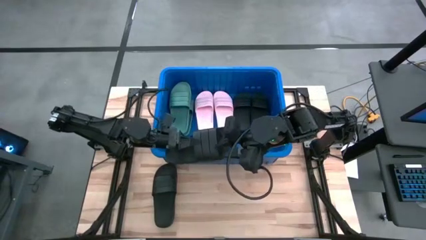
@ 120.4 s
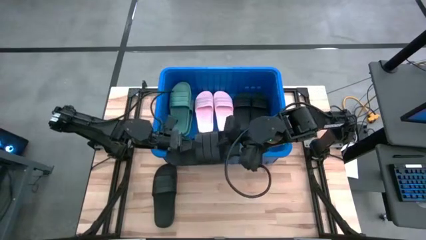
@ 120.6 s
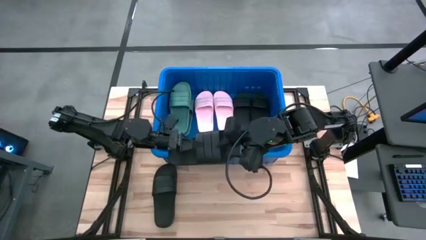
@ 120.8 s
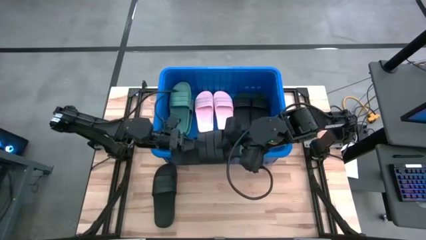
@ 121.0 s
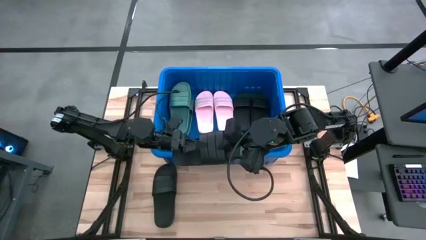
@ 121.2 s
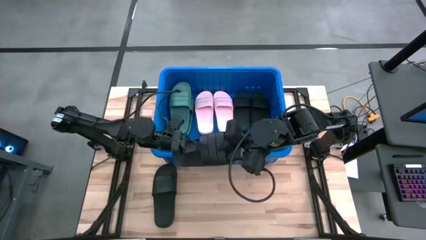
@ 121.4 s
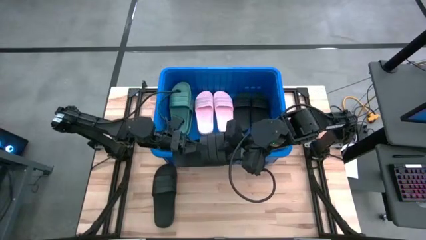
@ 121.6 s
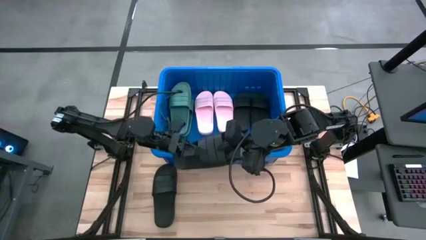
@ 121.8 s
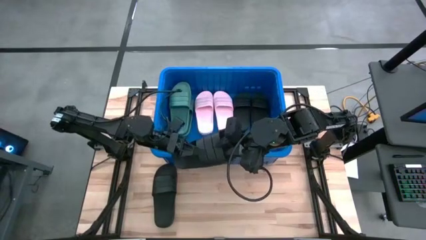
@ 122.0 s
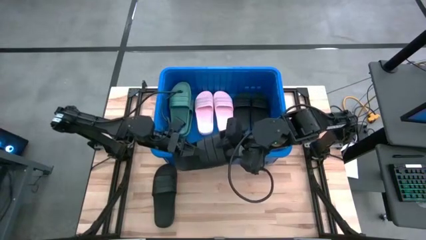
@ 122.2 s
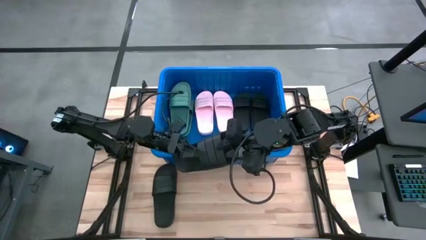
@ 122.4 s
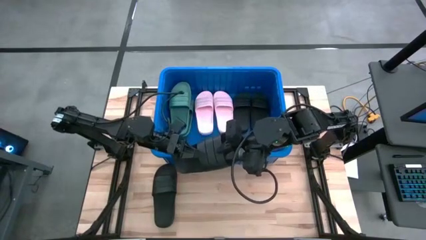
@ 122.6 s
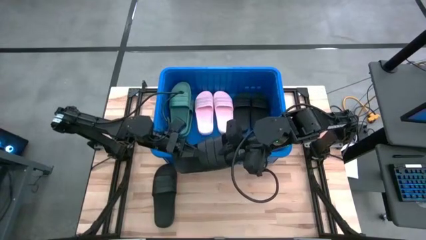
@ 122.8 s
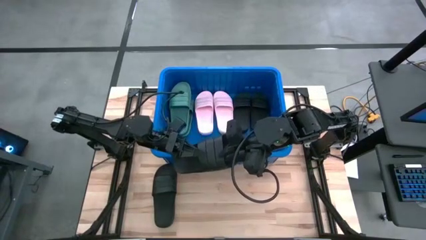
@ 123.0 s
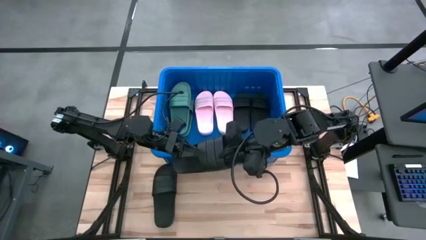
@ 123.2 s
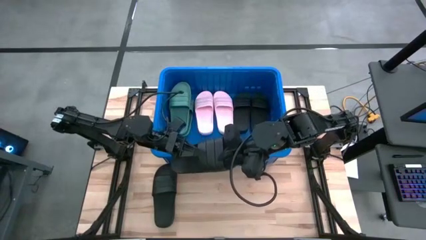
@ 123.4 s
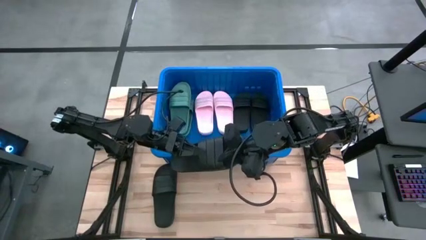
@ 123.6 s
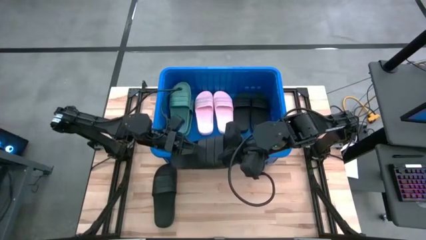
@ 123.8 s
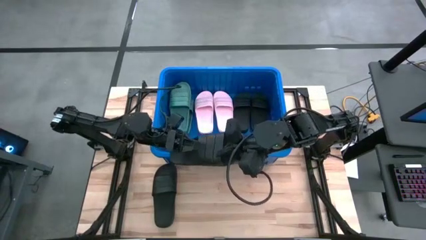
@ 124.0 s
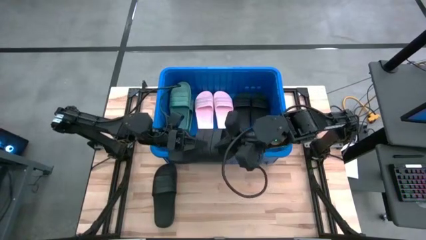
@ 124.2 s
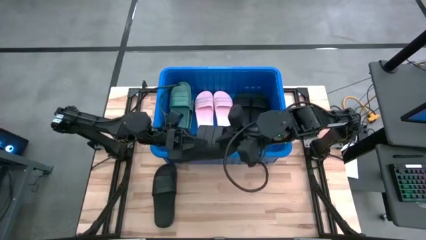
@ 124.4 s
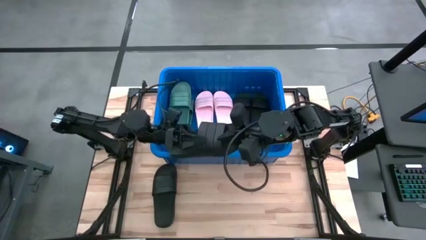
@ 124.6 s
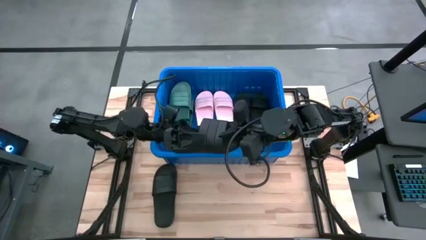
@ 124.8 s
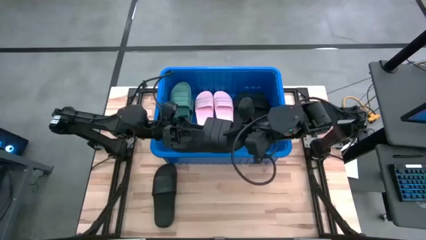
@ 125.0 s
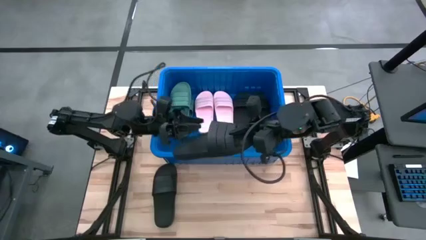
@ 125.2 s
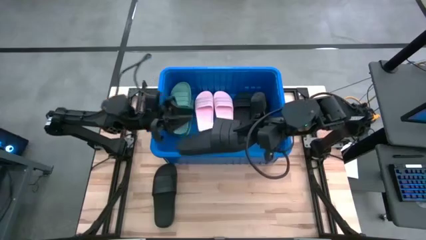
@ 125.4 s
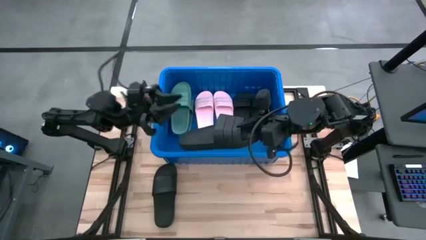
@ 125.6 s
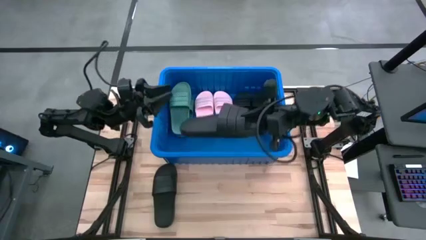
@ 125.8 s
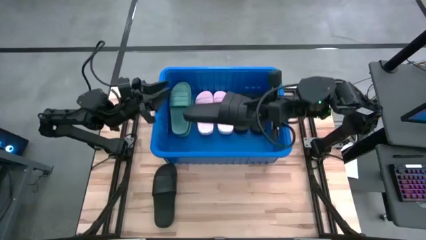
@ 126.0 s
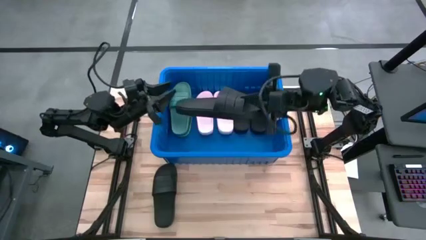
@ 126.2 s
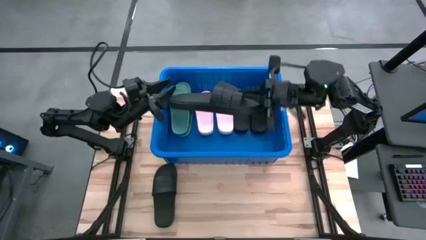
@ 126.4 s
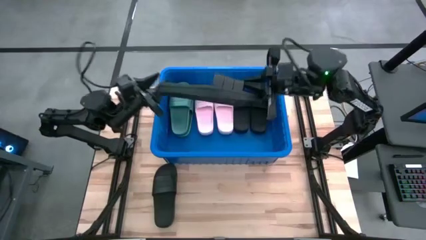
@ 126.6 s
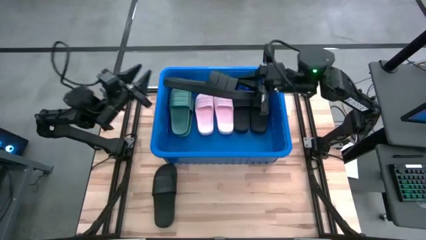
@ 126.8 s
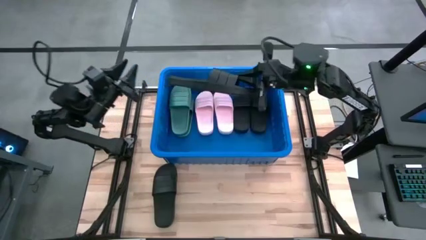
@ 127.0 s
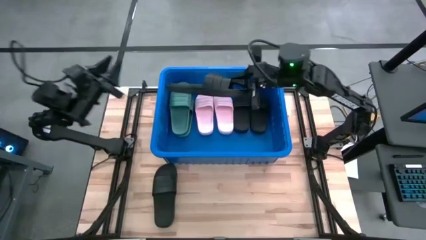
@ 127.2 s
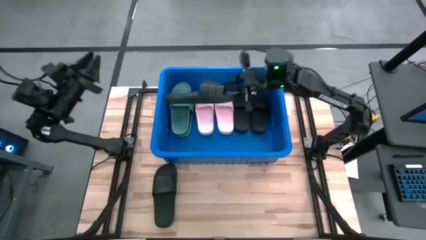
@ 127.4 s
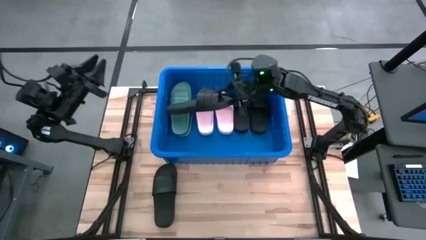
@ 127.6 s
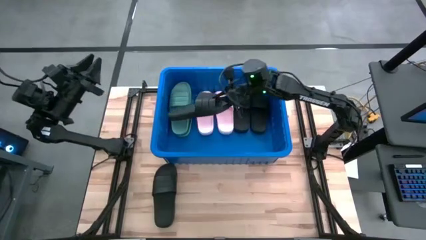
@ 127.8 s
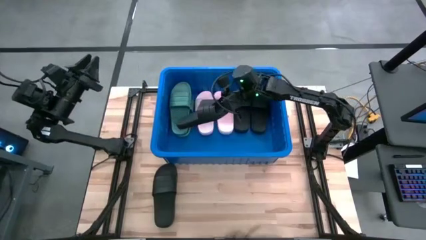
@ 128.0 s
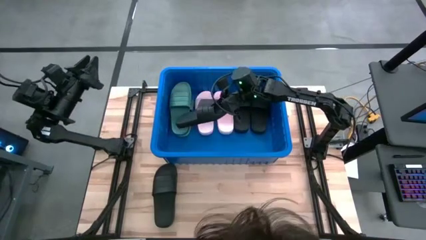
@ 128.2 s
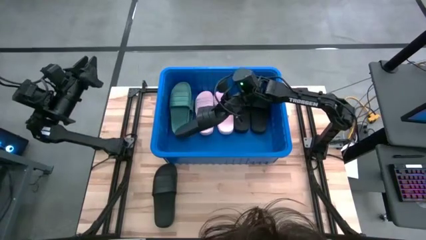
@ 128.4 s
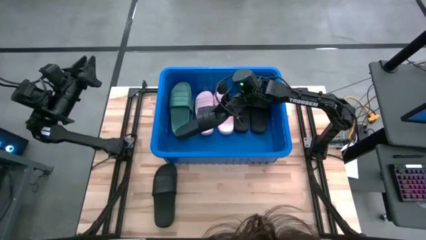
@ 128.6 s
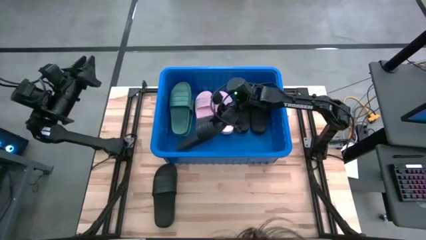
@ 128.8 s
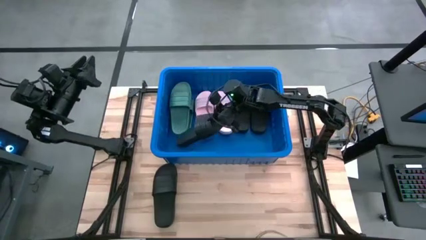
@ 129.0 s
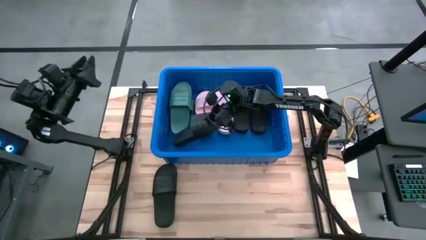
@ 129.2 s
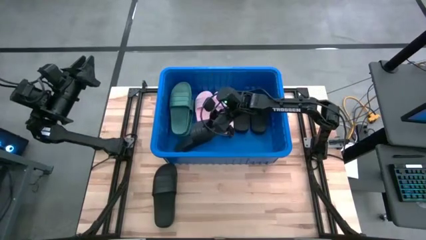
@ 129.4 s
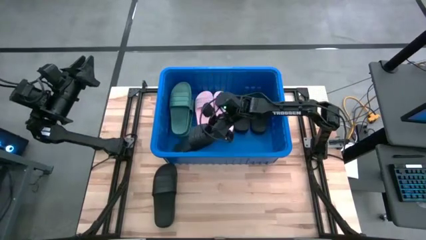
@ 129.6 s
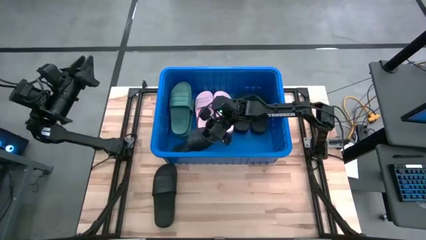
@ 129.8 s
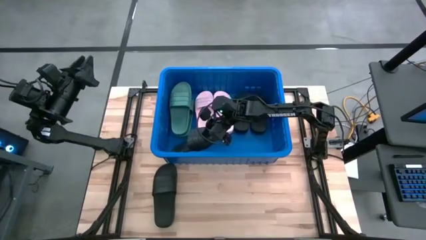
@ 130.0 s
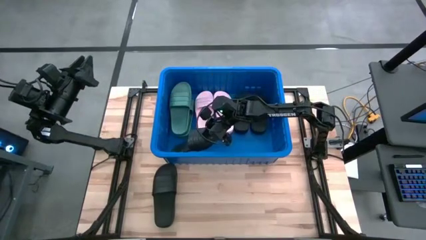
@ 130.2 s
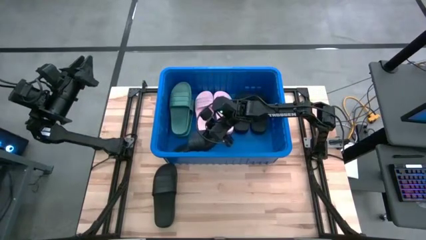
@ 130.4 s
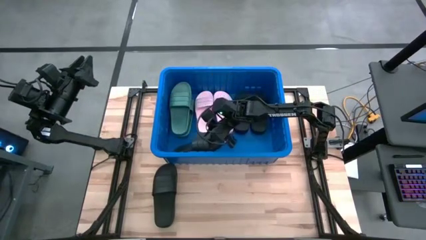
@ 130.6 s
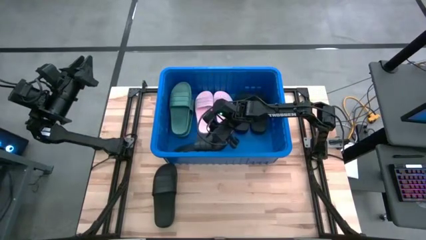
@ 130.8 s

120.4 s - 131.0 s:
Task: Pick and place slides into bin
Put the black slipper into the blue bin

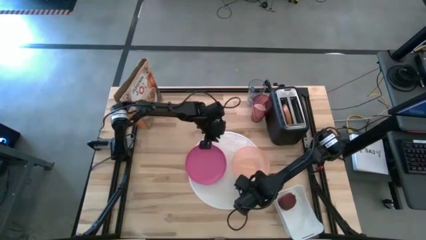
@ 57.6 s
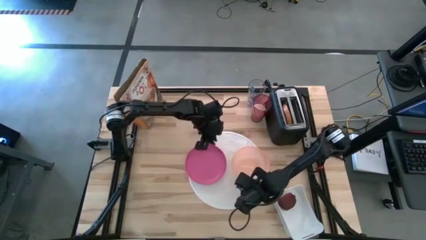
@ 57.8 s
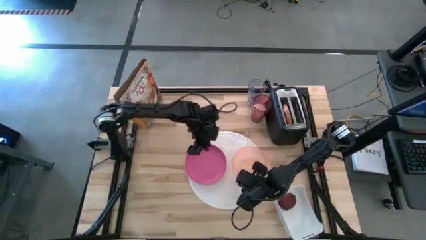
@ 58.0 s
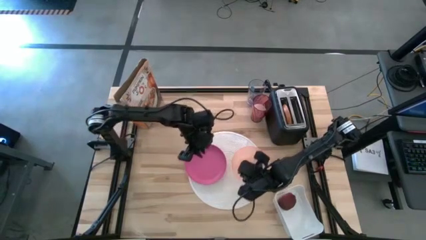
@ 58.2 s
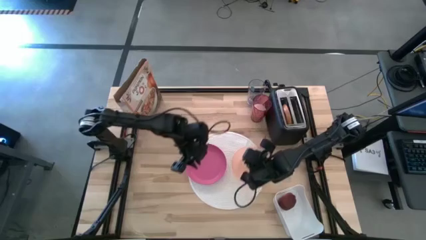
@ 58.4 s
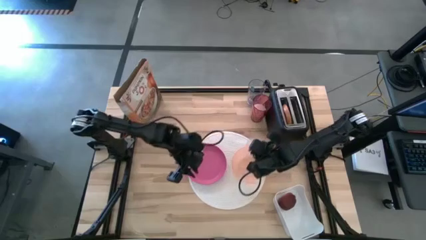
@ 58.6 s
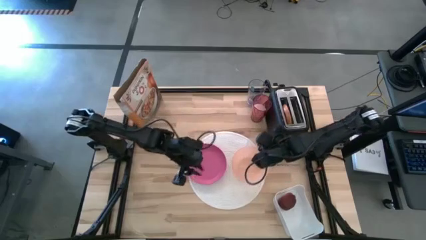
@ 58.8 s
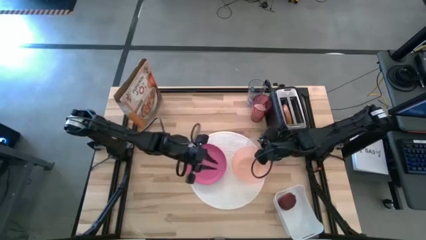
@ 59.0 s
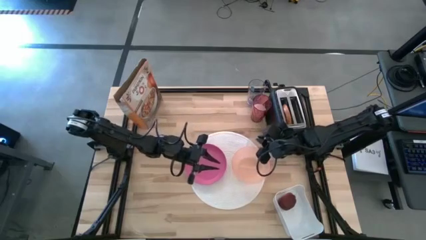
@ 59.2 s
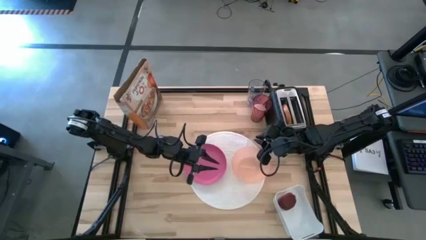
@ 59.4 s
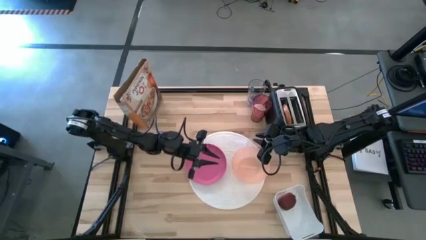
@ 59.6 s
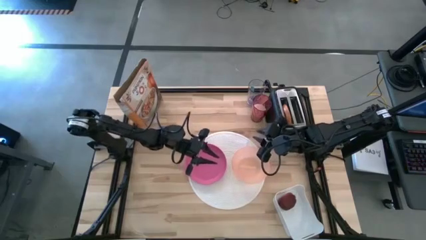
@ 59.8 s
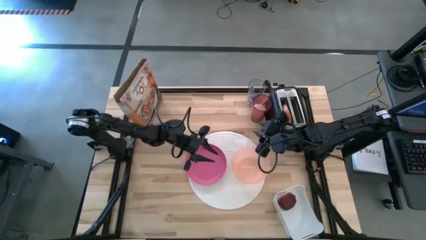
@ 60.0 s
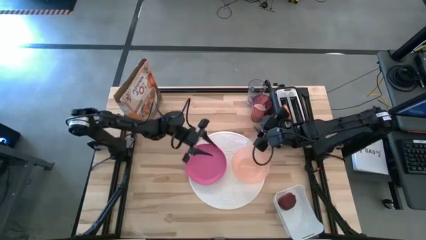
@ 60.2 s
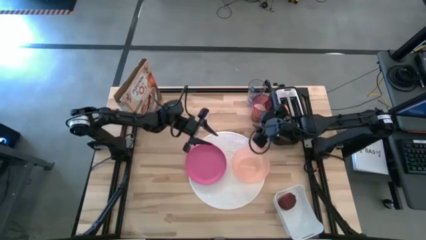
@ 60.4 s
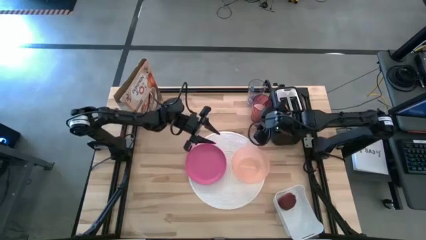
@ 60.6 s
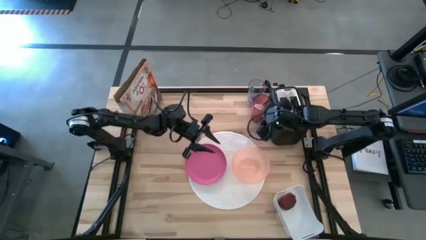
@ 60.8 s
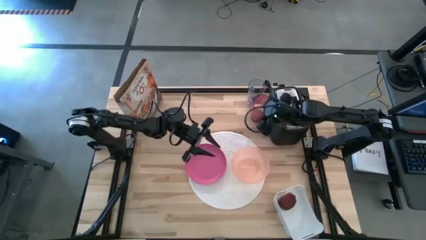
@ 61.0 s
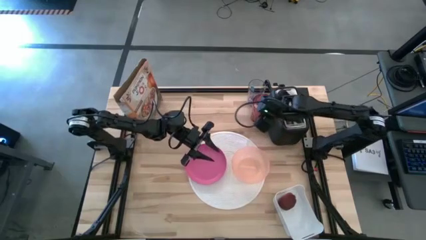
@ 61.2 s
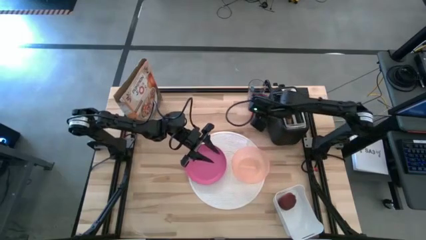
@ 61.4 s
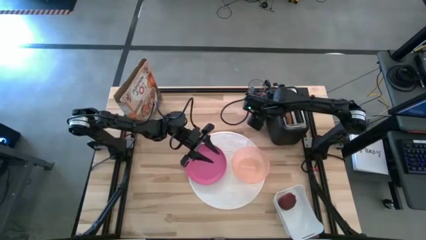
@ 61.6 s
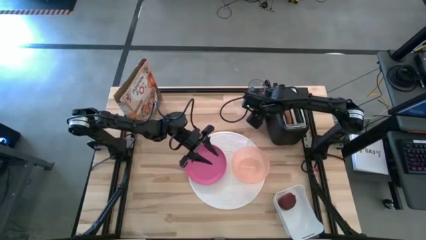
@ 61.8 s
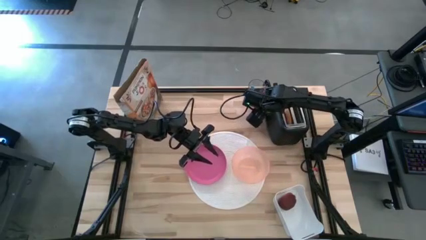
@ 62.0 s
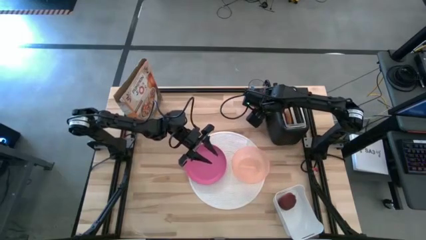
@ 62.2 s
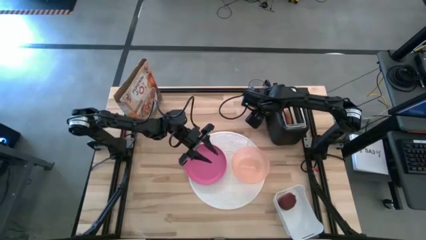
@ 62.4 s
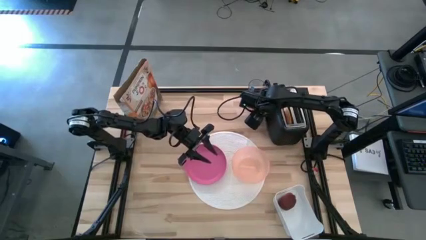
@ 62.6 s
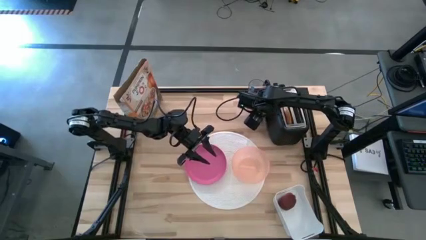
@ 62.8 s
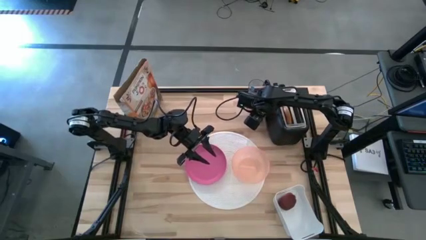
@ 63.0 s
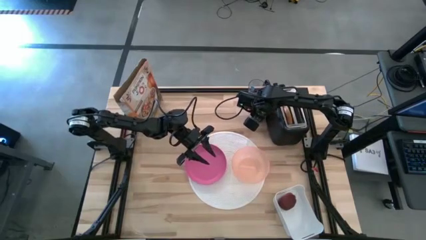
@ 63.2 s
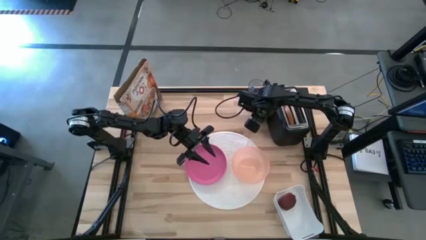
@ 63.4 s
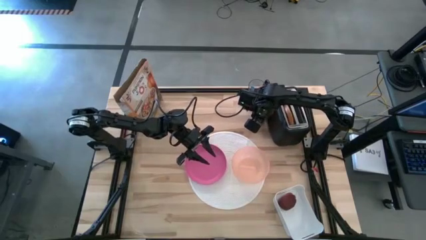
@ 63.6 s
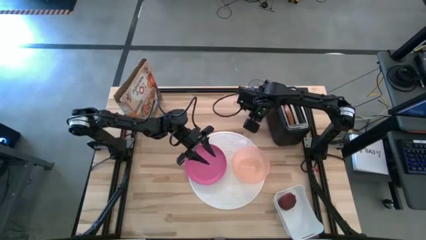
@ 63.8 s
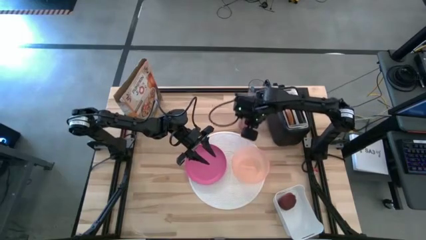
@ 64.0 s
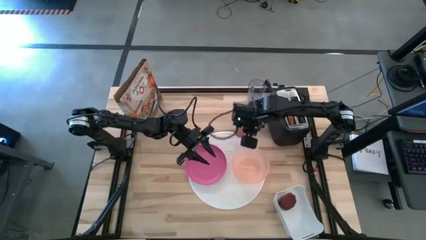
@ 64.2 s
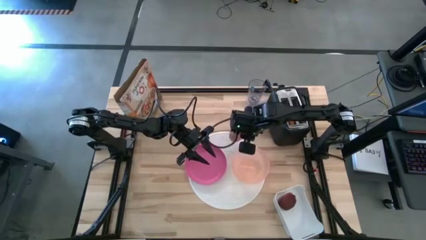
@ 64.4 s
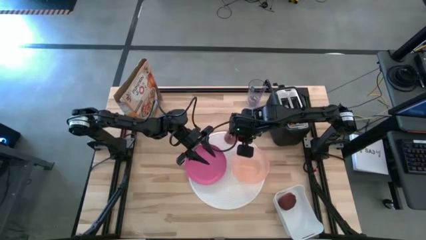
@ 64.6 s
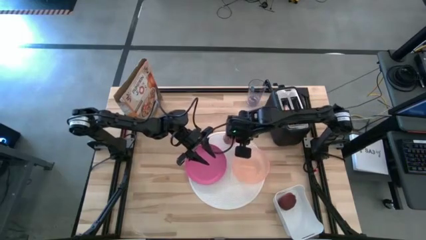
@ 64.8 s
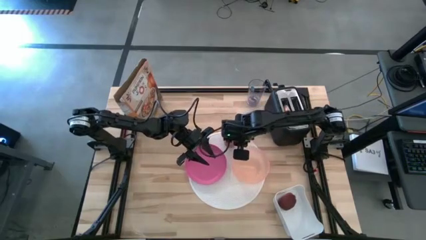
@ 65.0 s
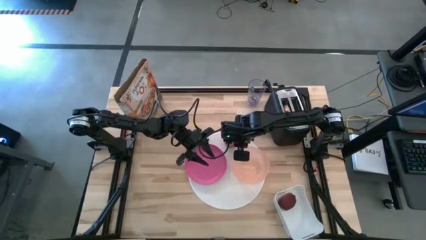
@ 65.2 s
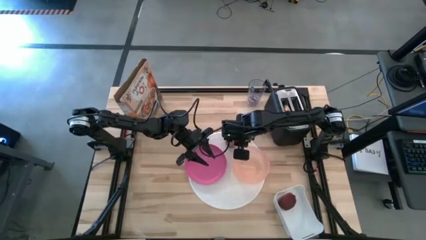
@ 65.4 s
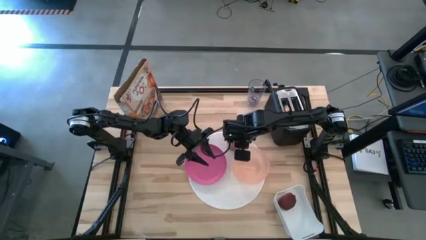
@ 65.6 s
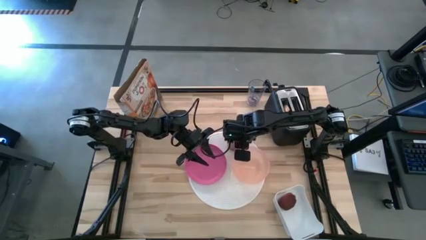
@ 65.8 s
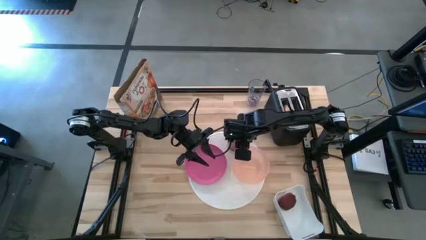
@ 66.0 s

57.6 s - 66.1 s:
Task: Arrange a breakfast setting
Put the red cup on the white placemat
